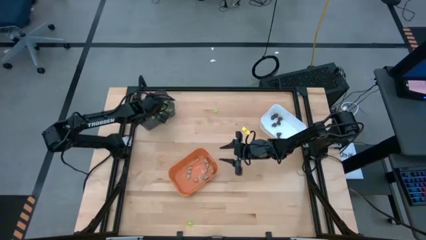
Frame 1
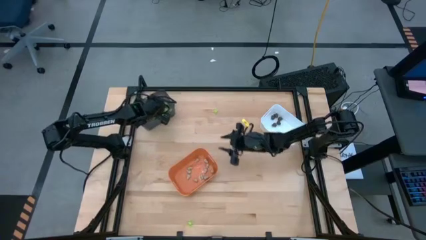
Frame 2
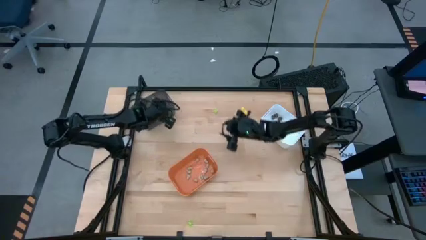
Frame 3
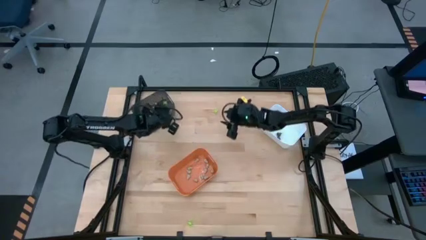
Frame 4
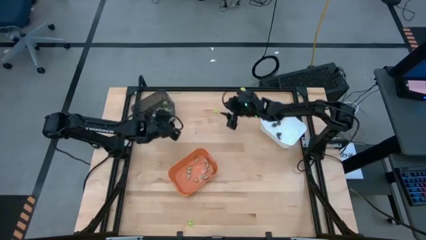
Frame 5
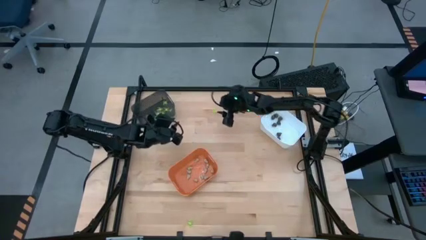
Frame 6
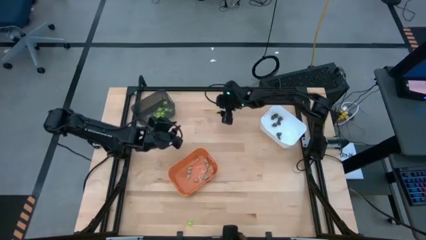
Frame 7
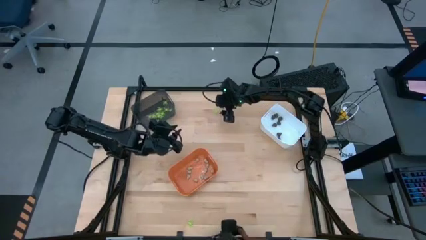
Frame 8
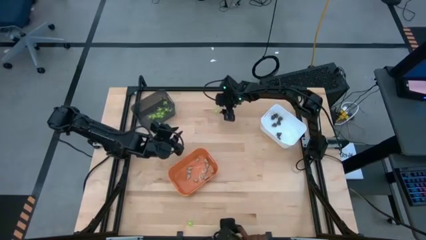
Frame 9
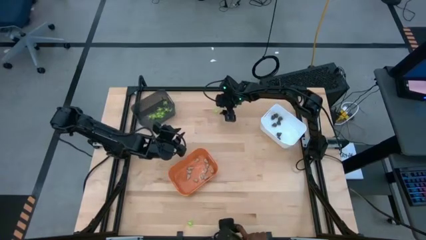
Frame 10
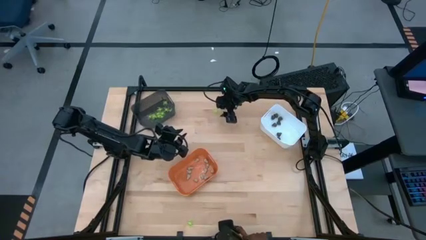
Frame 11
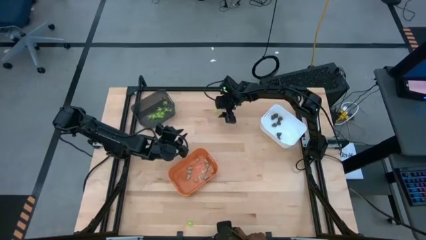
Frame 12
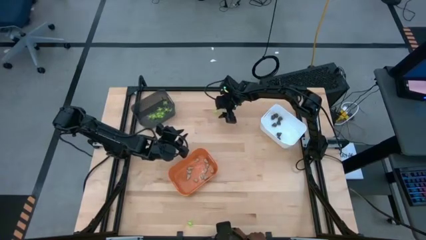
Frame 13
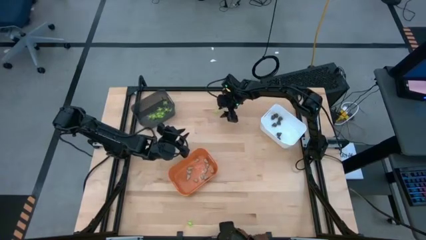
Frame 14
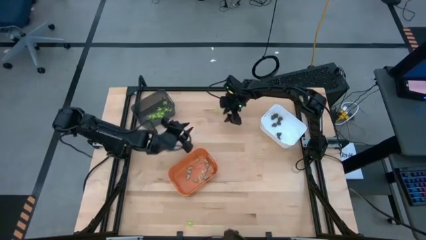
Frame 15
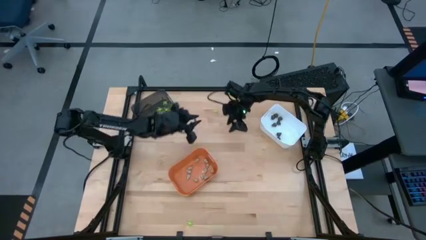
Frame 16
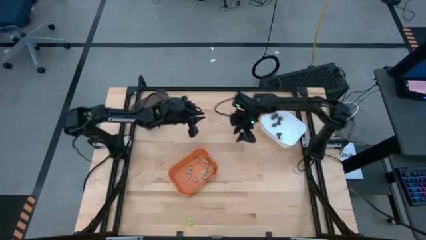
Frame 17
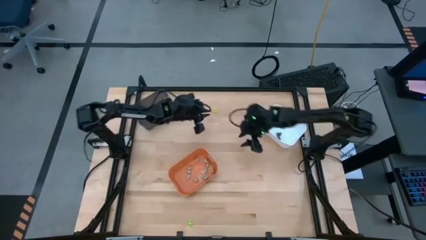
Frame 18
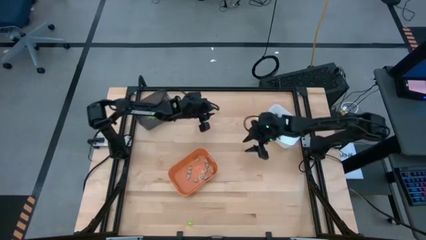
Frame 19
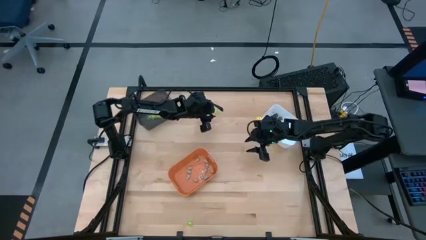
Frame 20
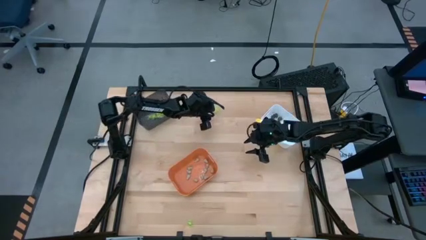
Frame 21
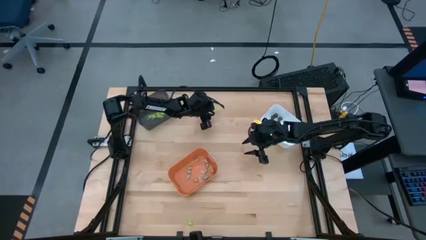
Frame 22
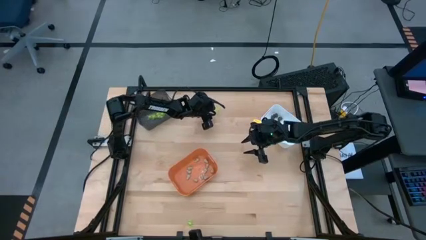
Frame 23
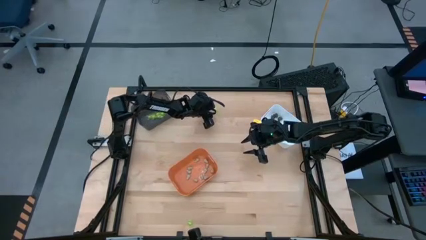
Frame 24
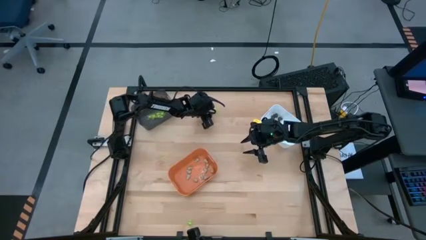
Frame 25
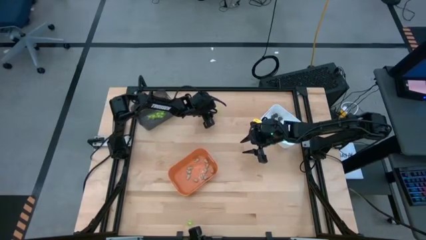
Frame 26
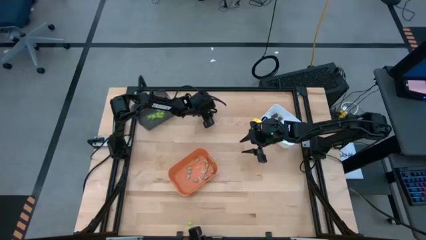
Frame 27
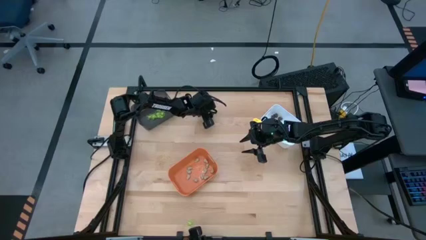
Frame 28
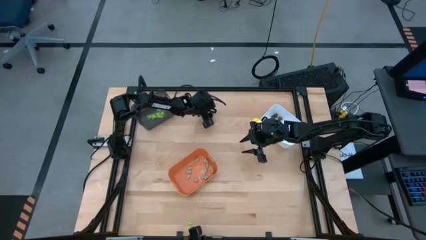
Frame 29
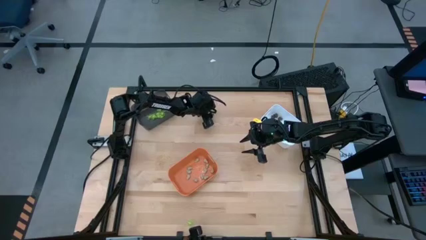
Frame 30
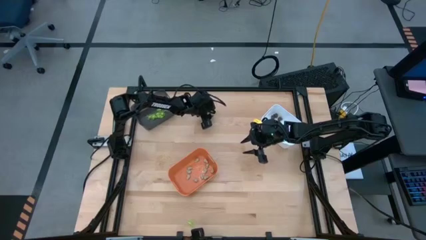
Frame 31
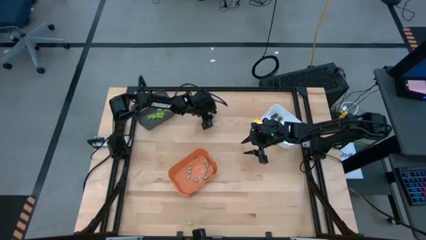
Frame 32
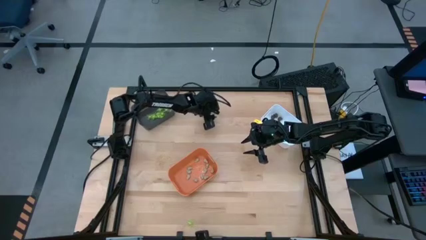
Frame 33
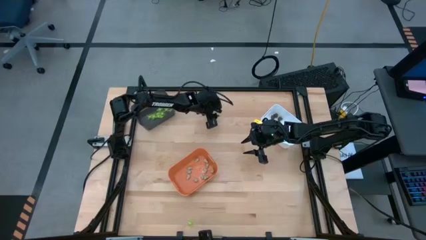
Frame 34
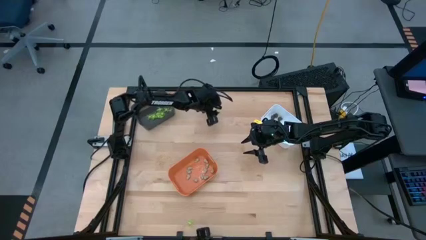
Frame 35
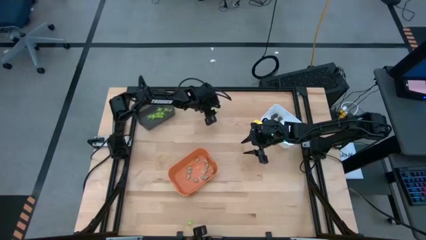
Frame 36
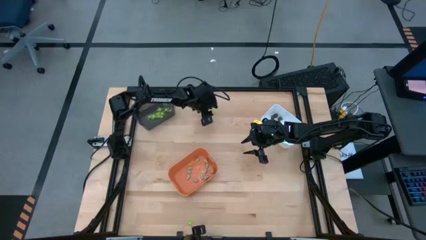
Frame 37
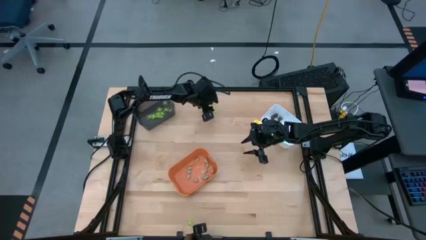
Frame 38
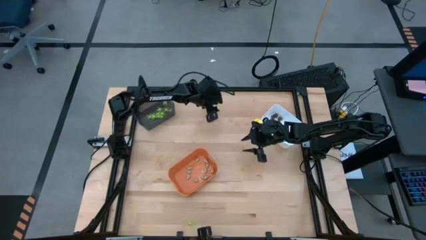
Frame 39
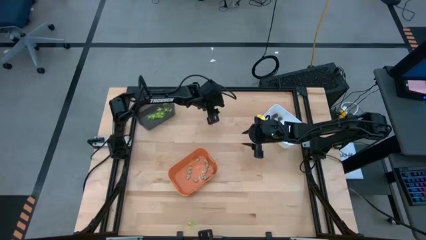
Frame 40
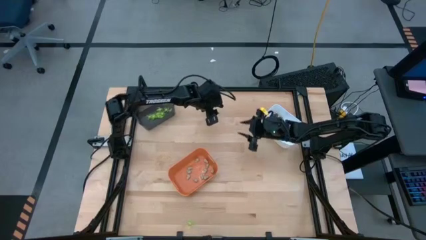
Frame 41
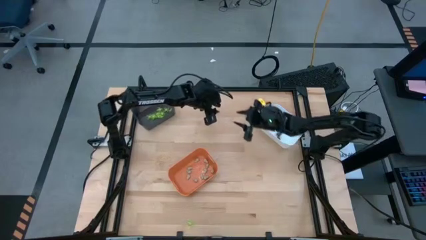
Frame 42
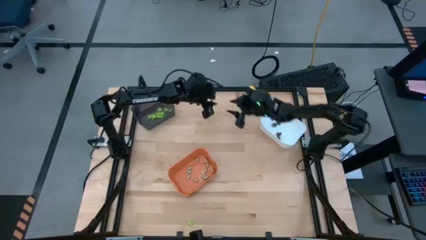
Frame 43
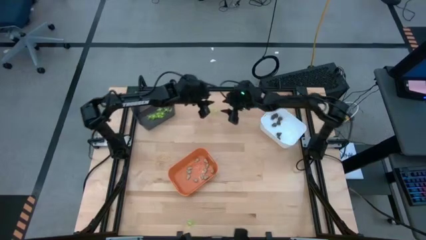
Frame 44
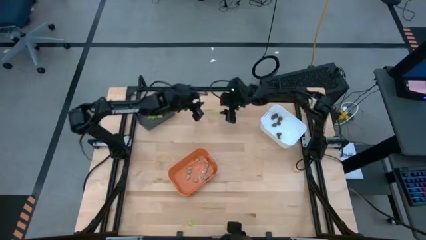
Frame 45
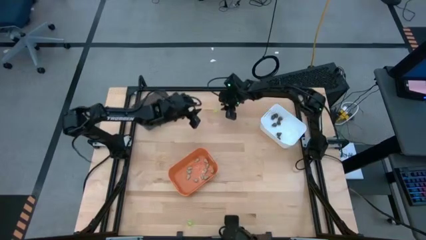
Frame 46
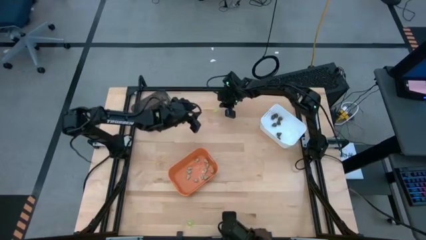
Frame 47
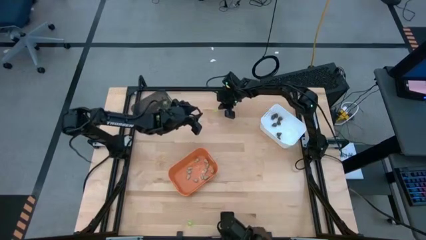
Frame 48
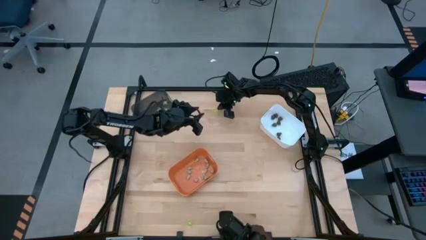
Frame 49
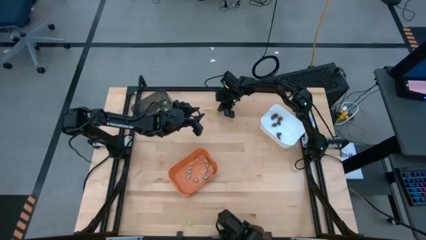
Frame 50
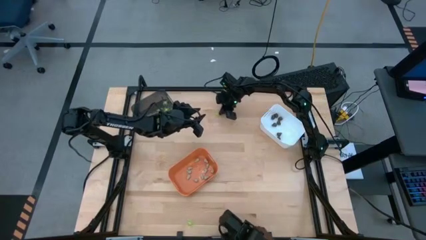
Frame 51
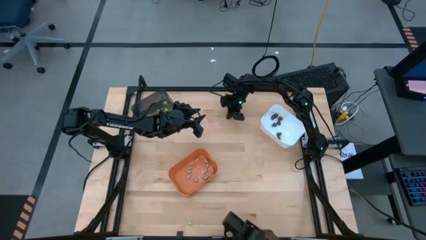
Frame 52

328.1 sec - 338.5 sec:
Task: Sort Halloween decoration
Put the green spider toy into the black bin
